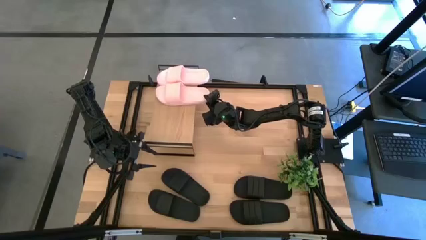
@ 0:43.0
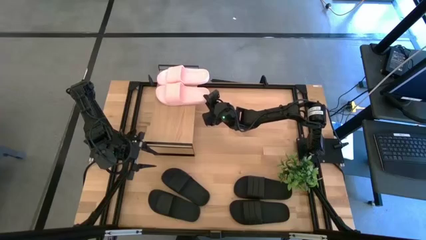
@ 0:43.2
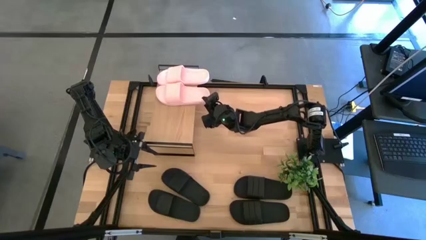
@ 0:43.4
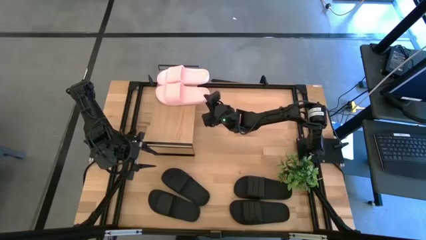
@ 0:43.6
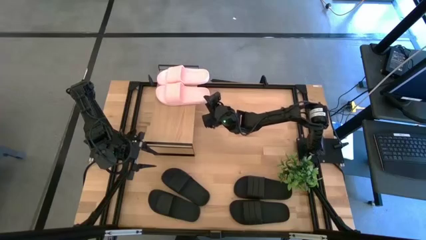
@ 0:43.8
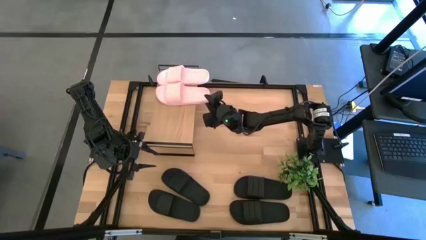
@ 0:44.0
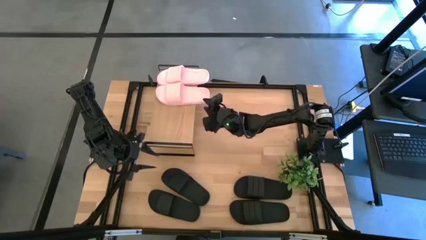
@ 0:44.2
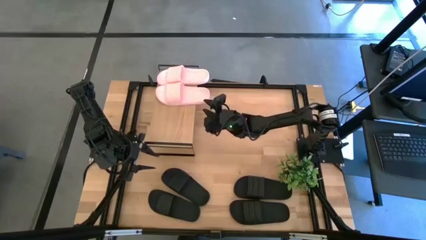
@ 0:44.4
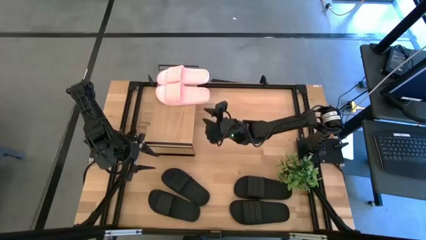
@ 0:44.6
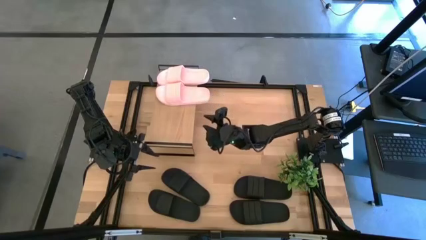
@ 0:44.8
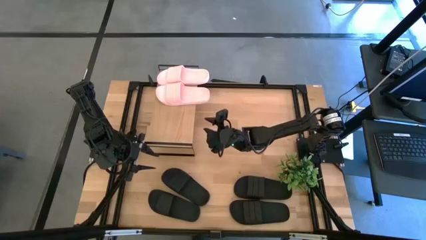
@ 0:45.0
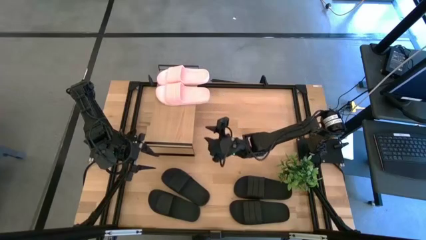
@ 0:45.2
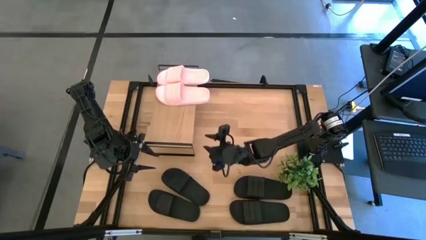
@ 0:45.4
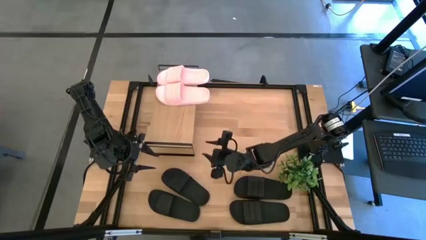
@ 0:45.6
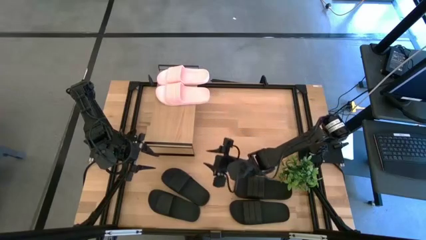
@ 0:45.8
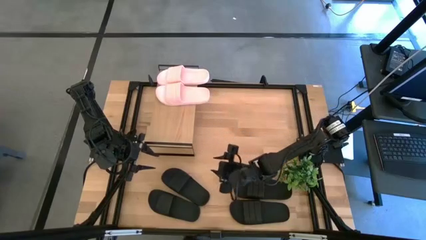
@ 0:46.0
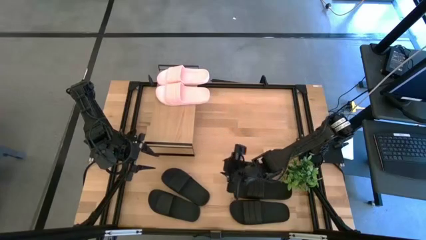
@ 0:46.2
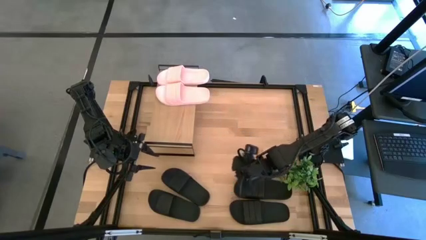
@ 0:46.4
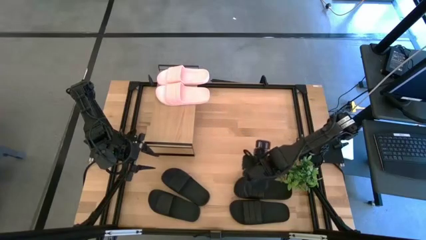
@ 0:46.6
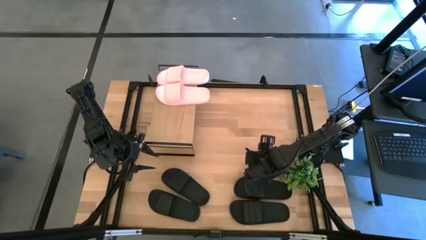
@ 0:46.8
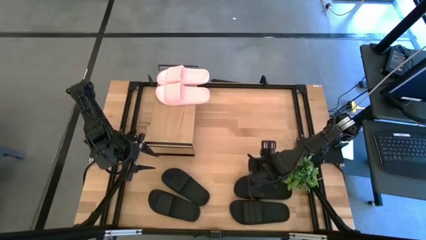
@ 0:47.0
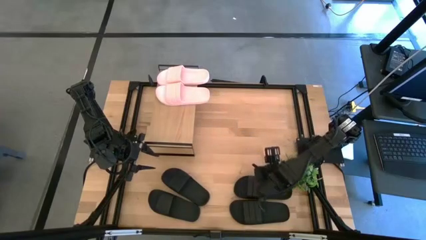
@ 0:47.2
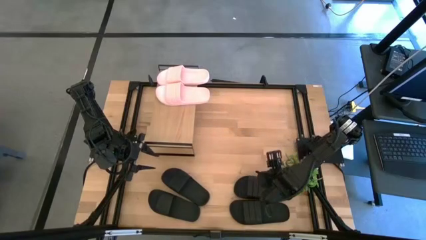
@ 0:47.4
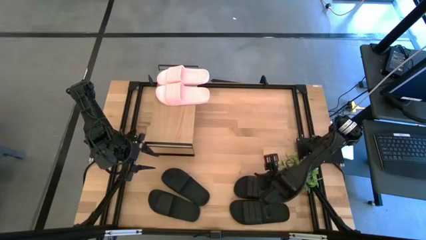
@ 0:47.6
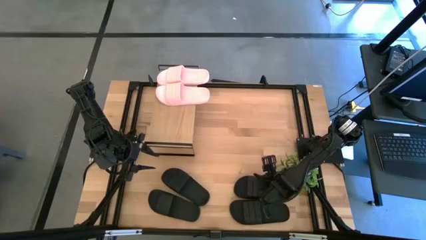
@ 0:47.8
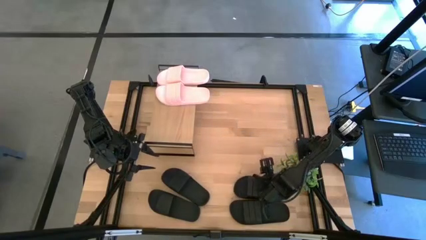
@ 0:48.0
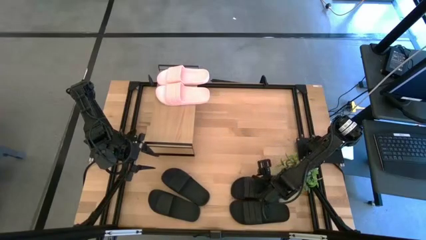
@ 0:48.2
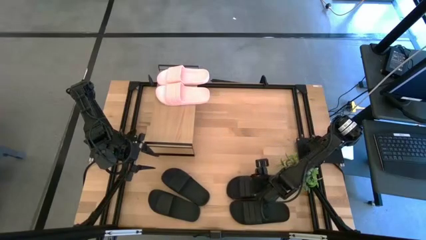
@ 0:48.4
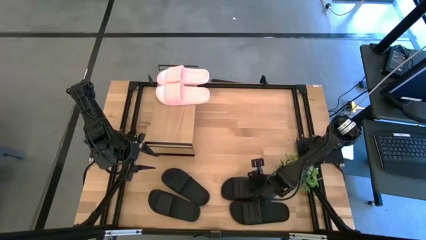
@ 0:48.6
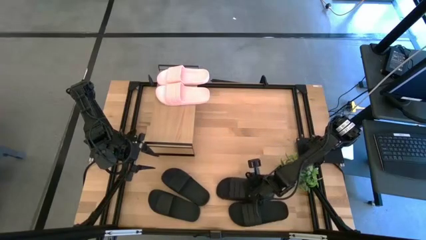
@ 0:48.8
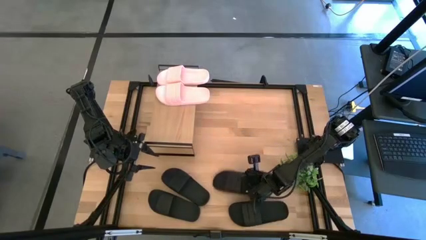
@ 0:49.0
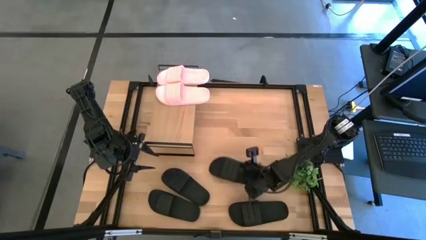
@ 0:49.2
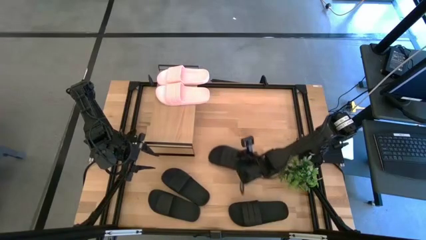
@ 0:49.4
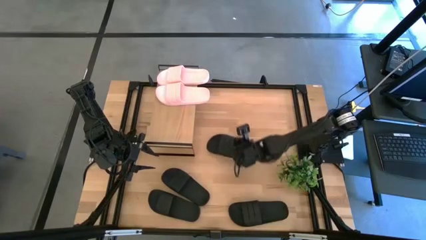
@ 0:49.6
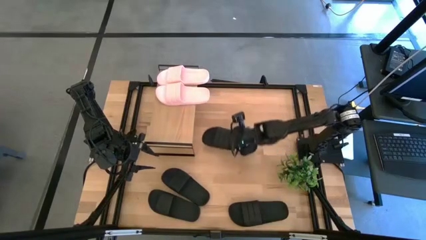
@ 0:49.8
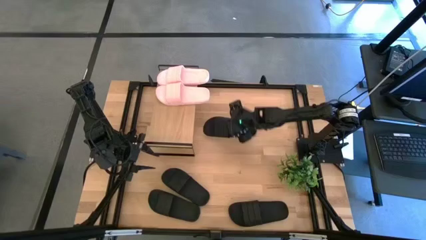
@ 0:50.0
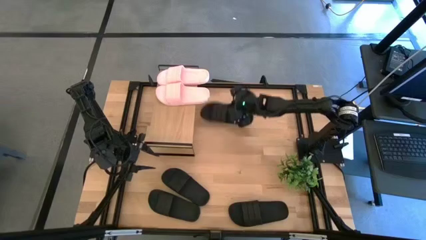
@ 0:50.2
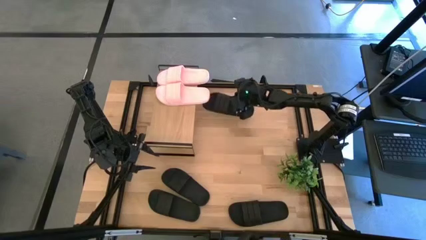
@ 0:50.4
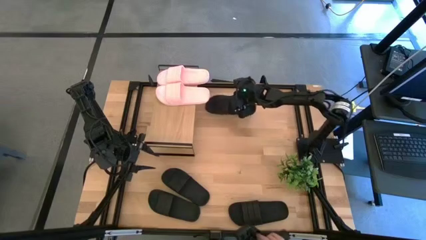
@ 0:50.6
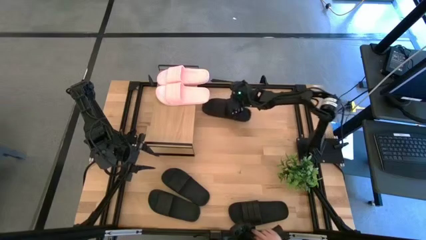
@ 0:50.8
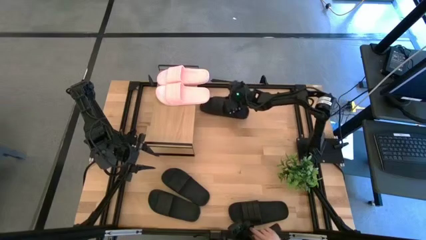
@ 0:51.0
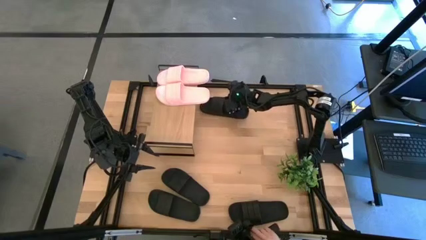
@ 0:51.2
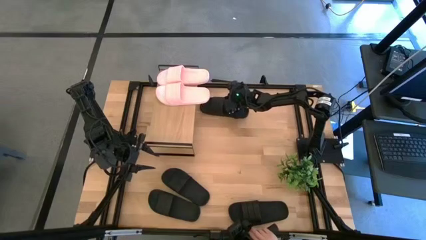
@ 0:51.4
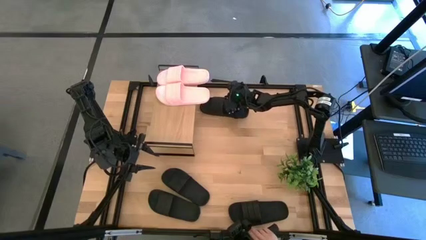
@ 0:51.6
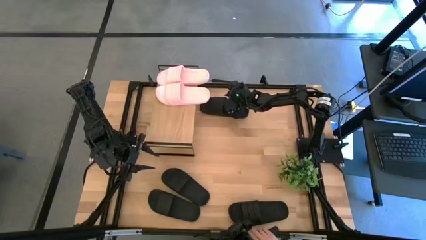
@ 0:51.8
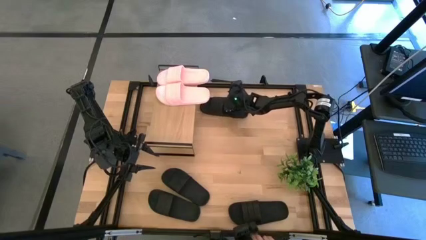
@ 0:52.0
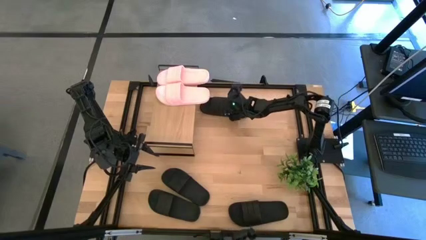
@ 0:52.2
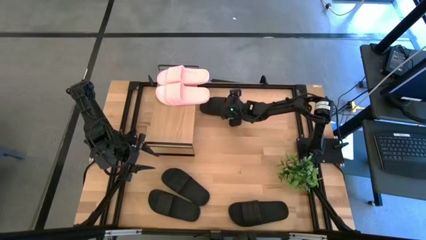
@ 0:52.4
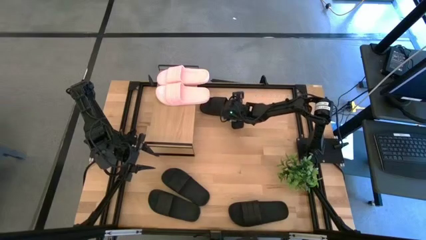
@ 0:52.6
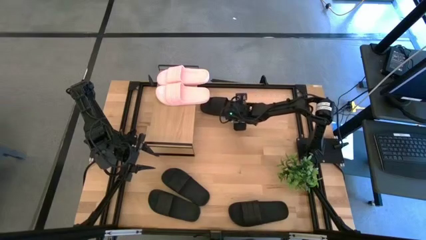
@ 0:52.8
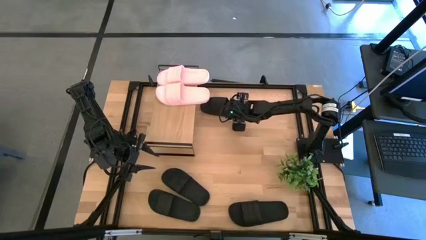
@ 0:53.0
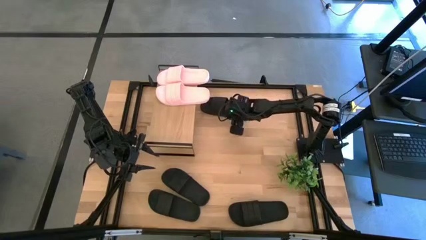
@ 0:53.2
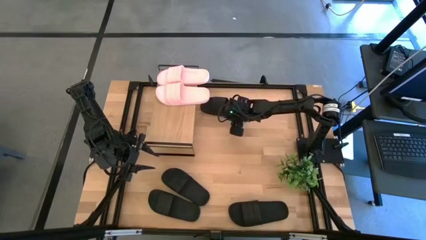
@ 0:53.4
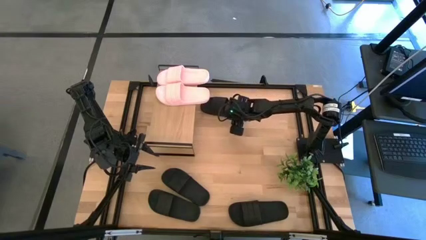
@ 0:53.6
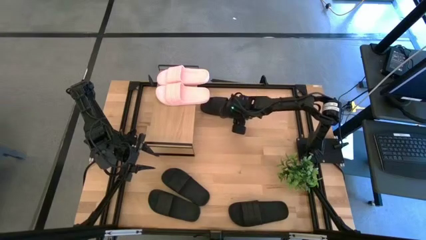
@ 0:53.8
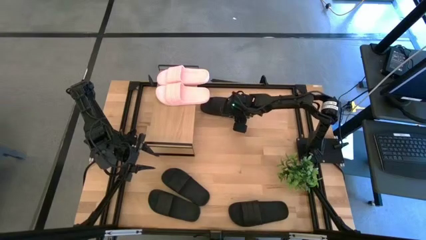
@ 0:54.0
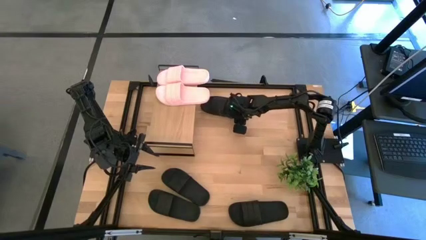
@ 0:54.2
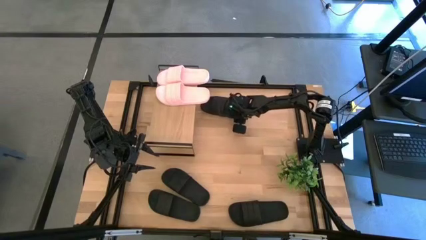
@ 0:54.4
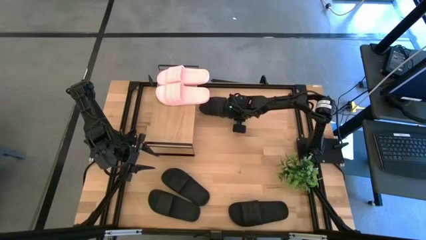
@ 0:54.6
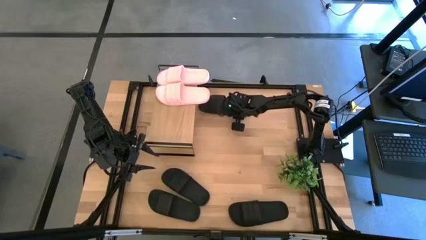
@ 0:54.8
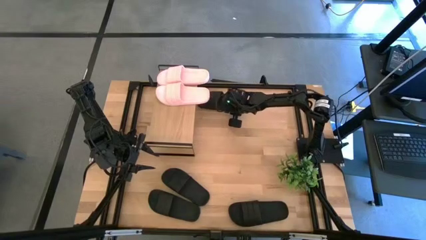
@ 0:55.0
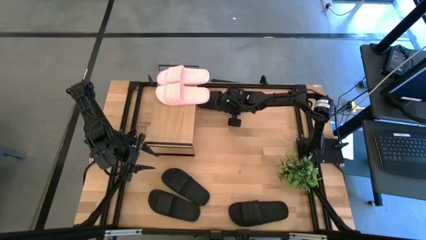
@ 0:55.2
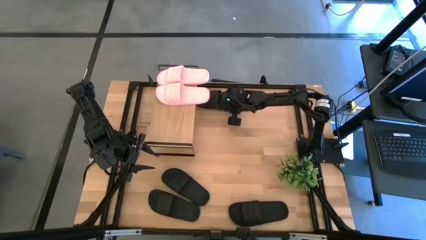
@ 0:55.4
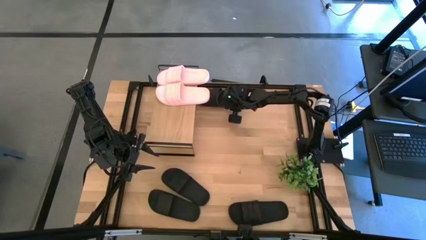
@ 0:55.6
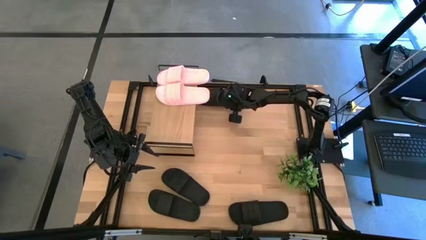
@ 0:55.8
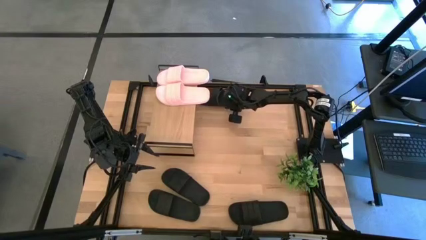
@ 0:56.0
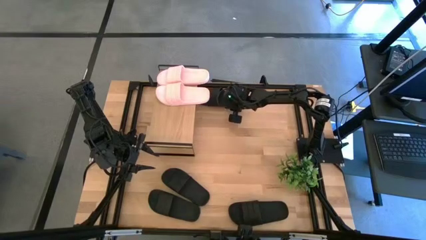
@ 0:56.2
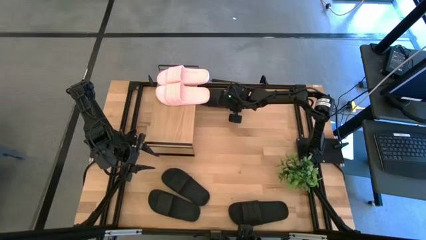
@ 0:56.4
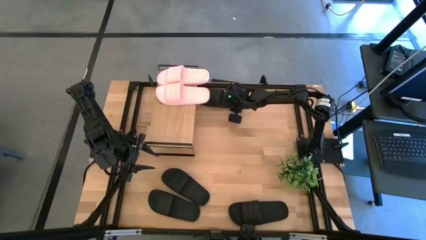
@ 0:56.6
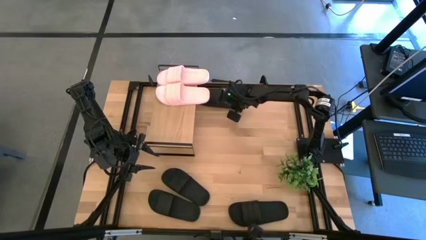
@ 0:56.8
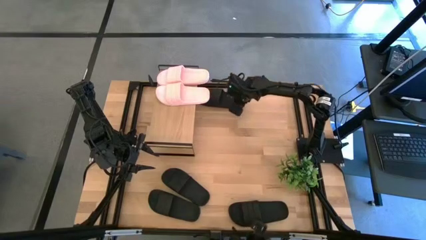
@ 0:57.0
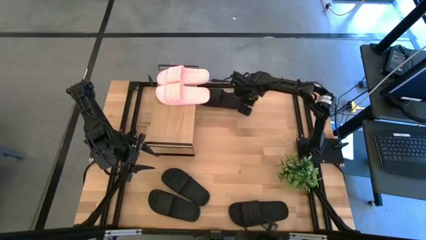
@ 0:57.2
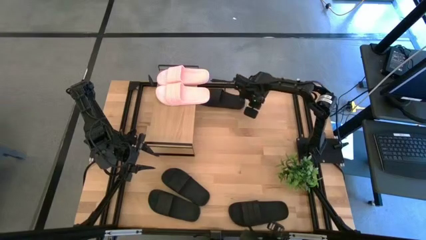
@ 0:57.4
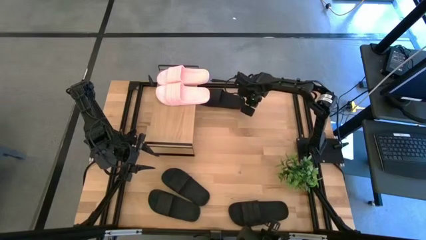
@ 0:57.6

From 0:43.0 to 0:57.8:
Task: Pick and place slides into the shelf
Put the top right black slide under the shelf
